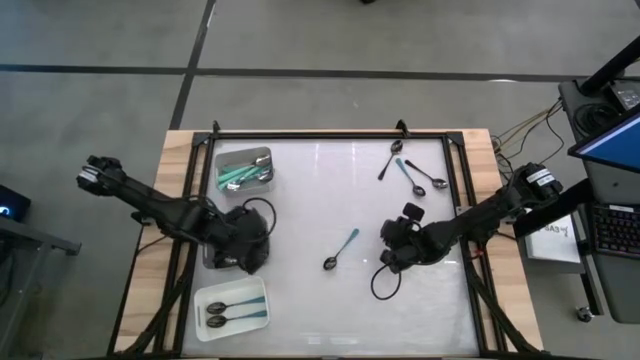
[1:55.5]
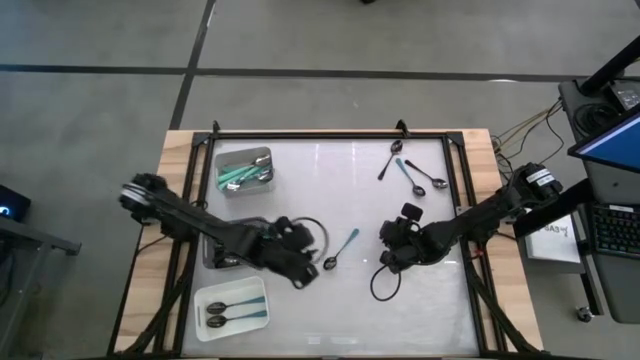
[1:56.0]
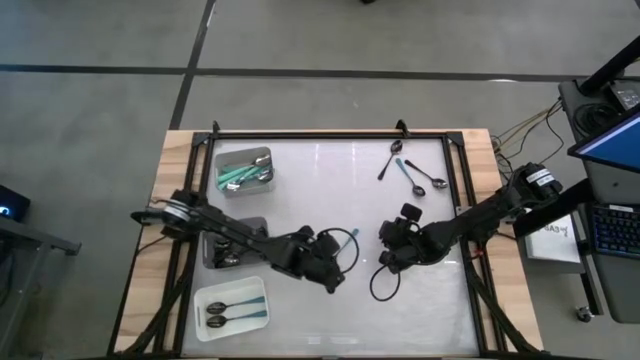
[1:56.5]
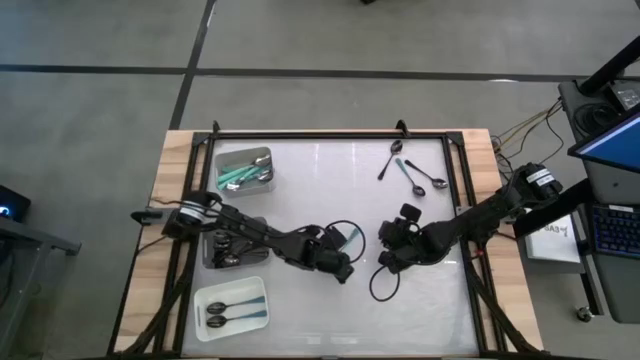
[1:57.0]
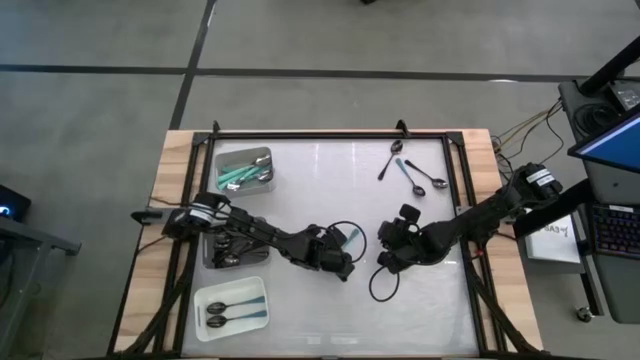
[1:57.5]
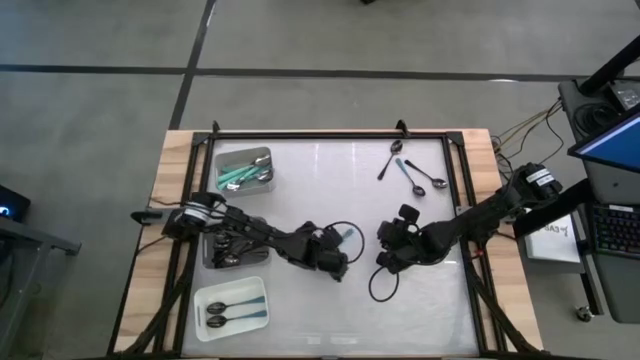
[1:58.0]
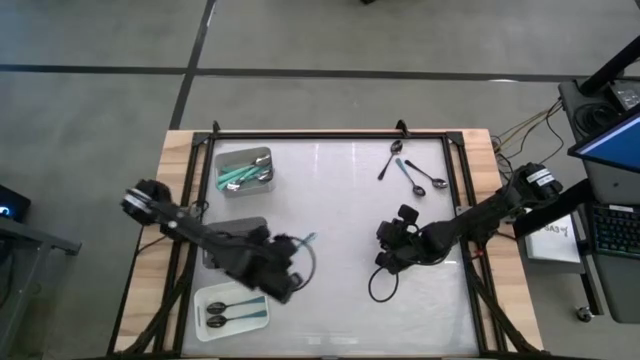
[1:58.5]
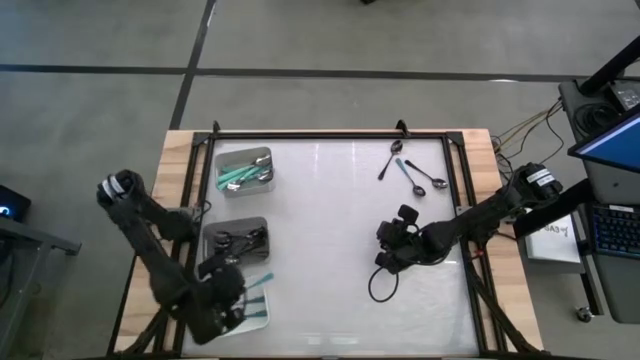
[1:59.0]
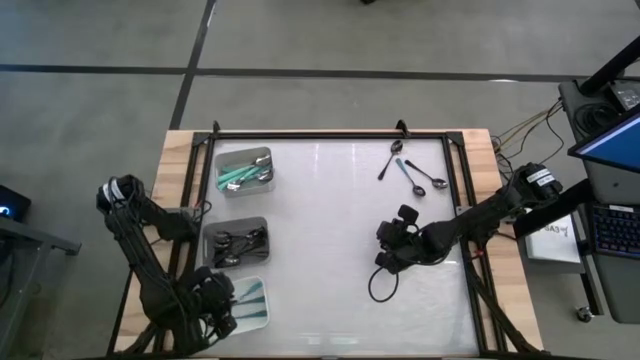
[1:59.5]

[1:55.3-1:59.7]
Task: Sort silverware by color (type)
Put the blue spoon into the white bin

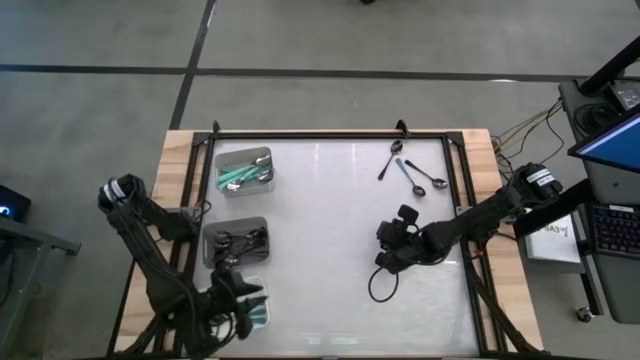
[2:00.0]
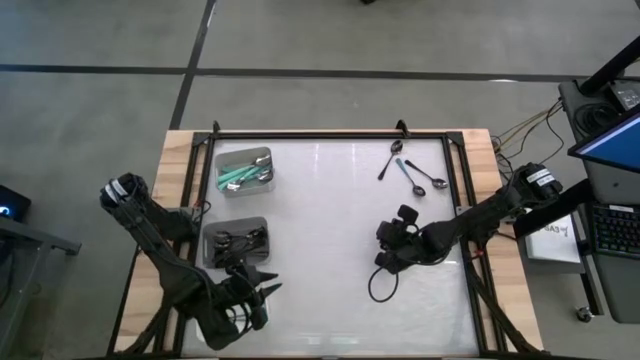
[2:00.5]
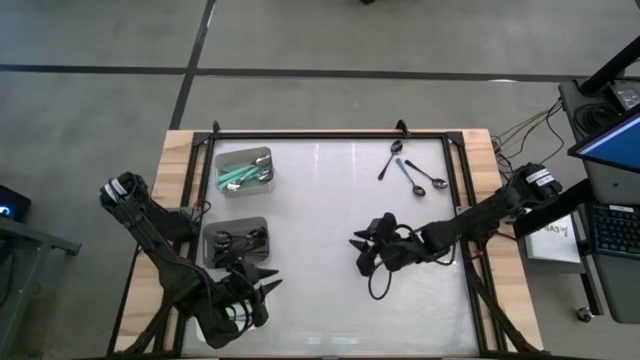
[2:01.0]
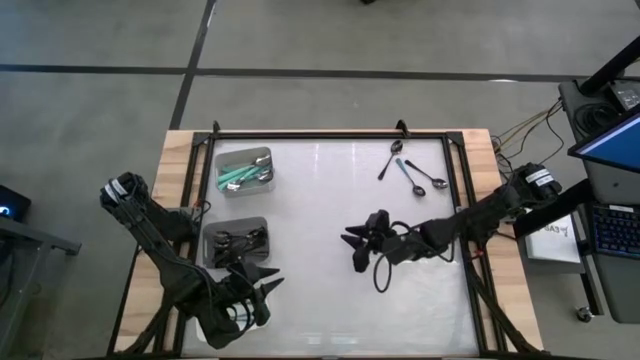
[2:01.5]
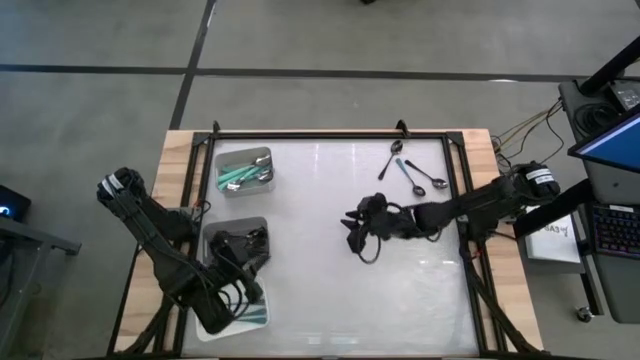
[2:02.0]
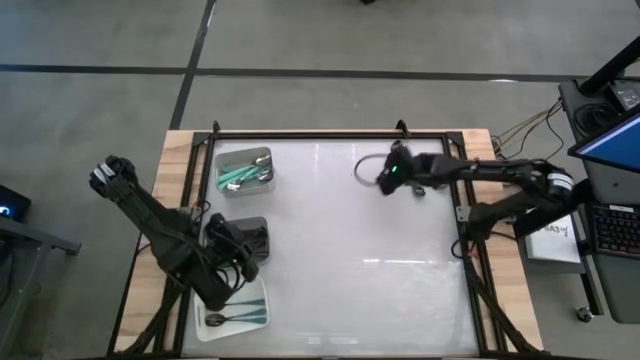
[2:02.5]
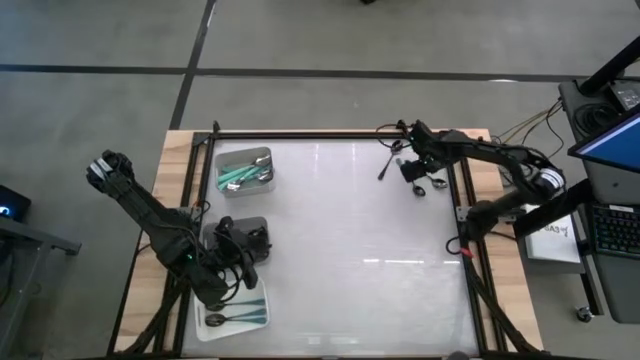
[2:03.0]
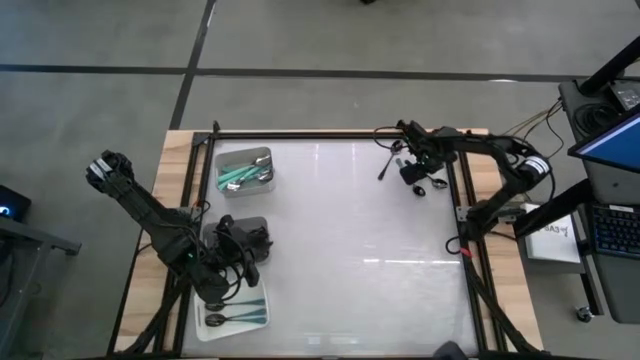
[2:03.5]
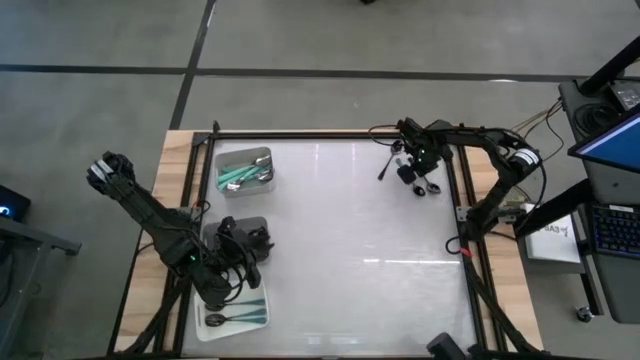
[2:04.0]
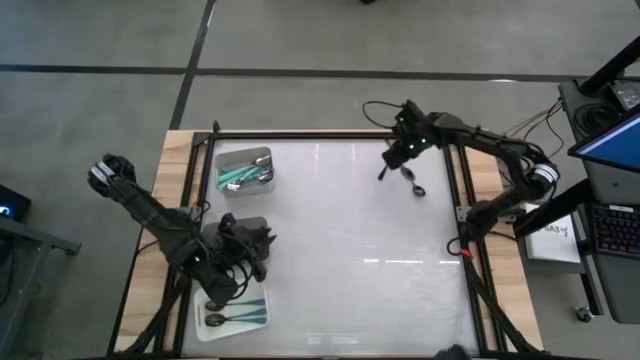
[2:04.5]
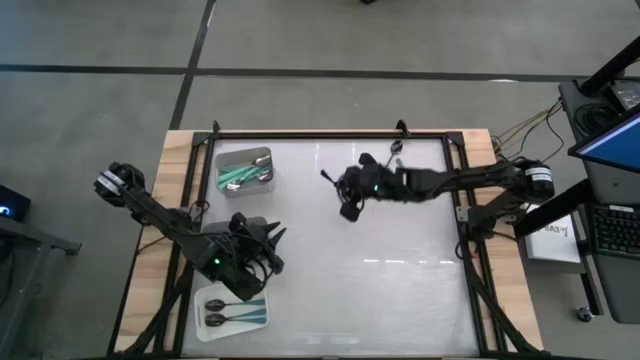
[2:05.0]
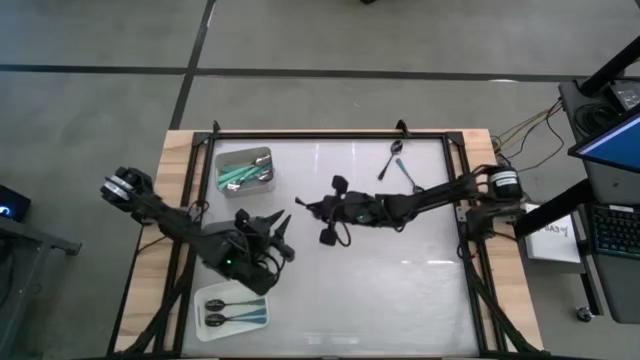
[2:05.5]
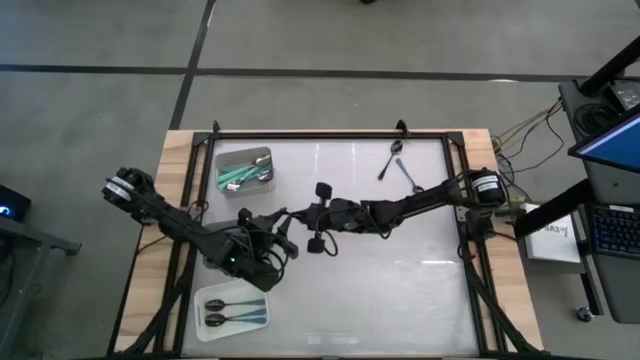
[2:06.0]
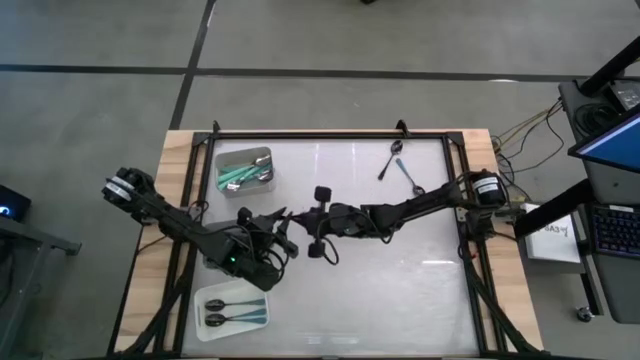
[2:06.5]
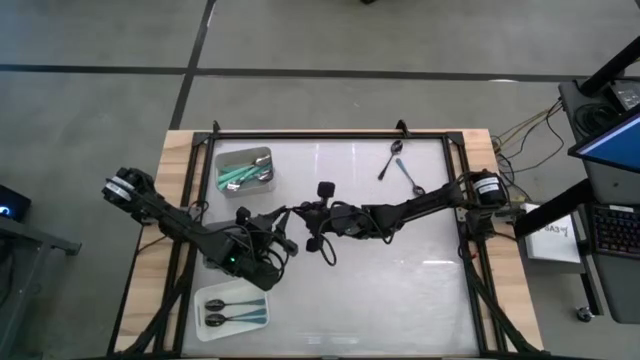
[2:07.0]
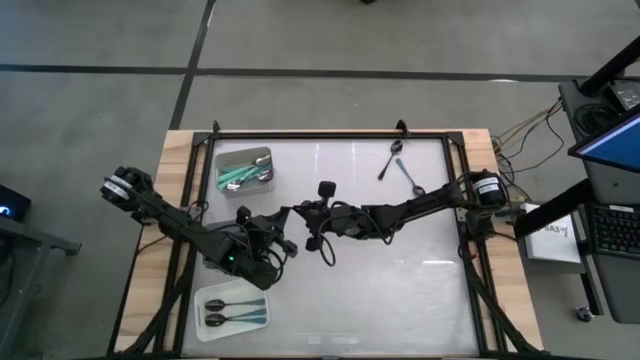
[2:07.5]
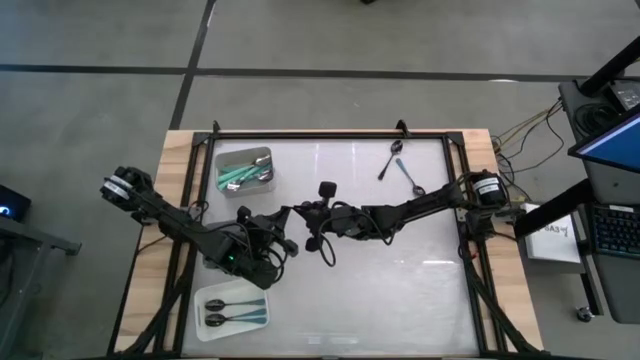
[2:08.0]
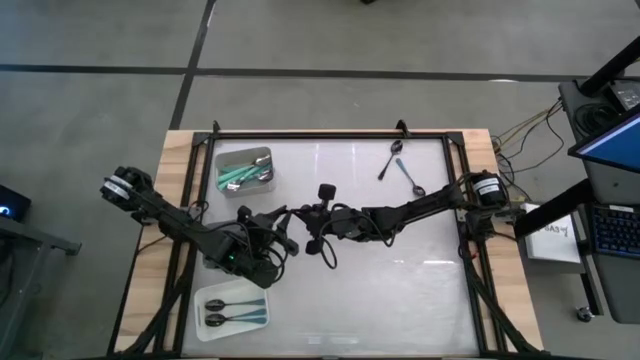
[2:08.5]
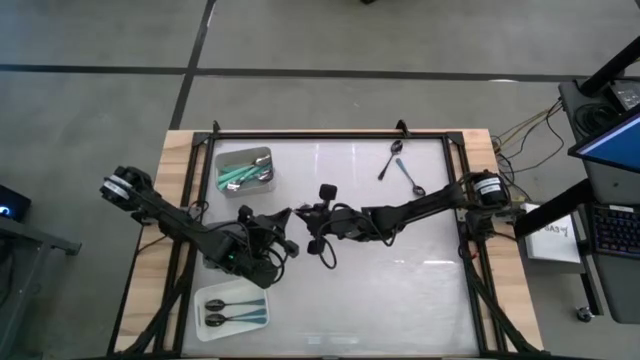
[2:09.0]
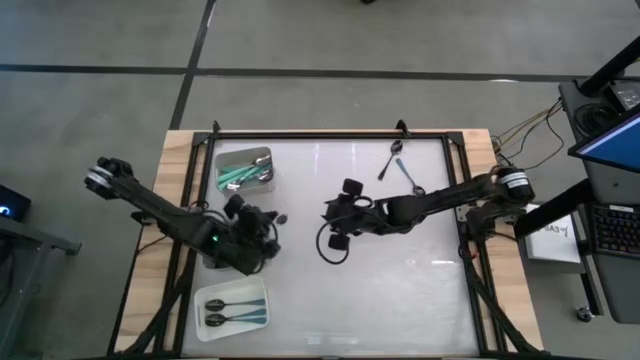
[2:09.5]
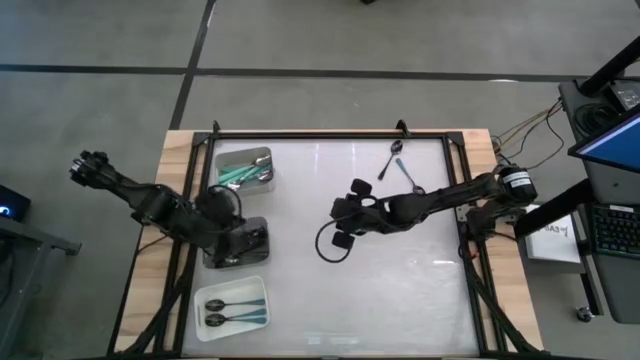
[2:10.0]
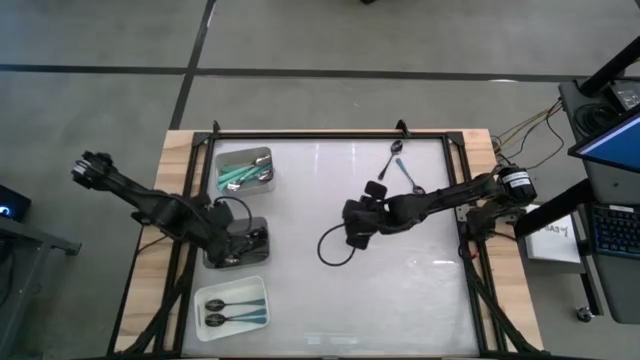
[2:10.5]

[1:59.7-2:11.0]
Put the black spoon into the black bin

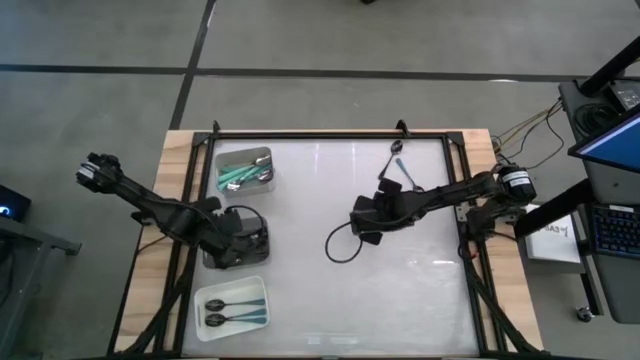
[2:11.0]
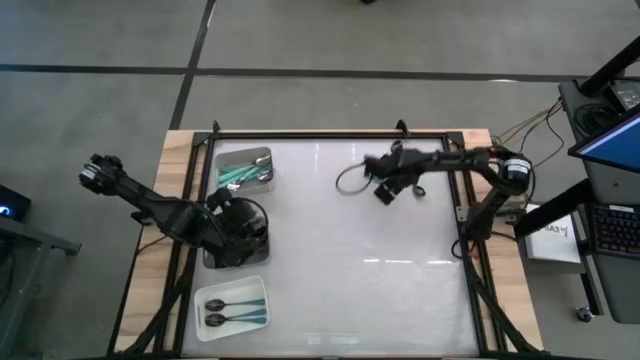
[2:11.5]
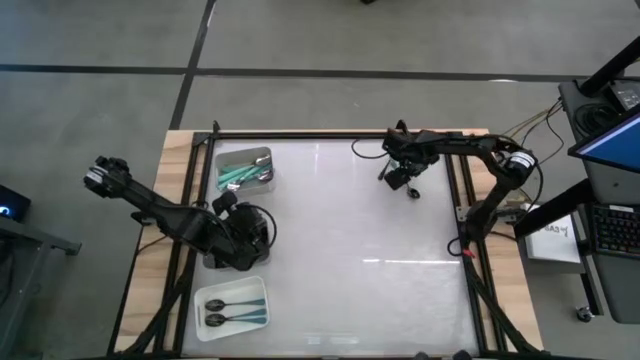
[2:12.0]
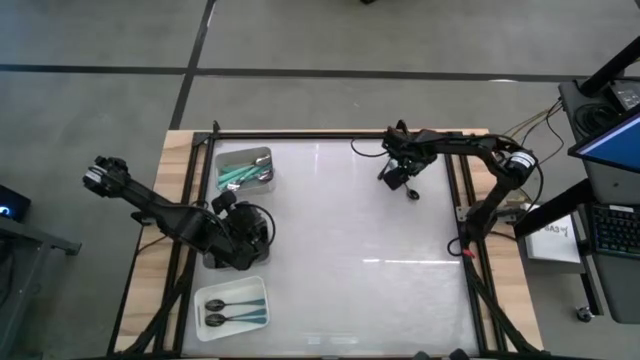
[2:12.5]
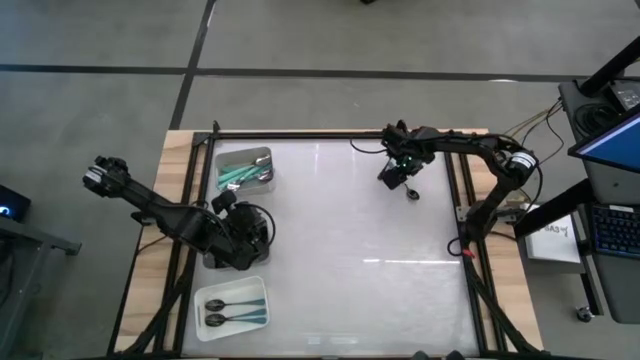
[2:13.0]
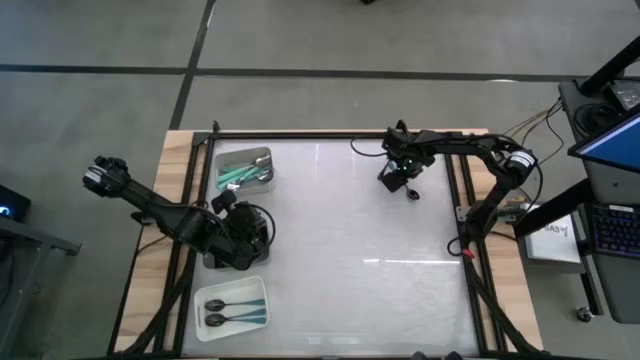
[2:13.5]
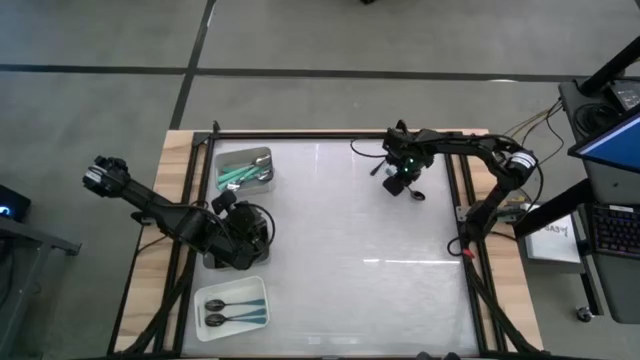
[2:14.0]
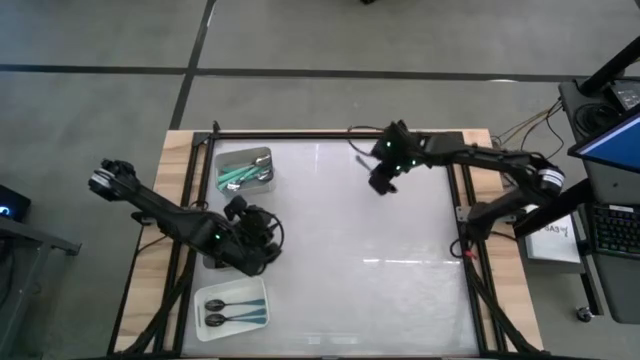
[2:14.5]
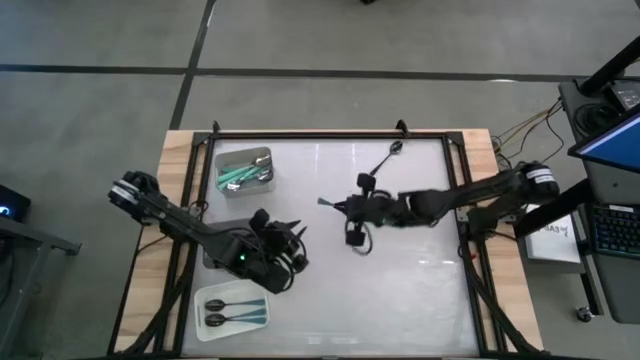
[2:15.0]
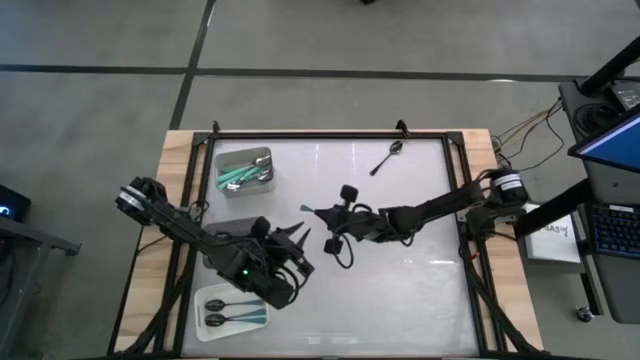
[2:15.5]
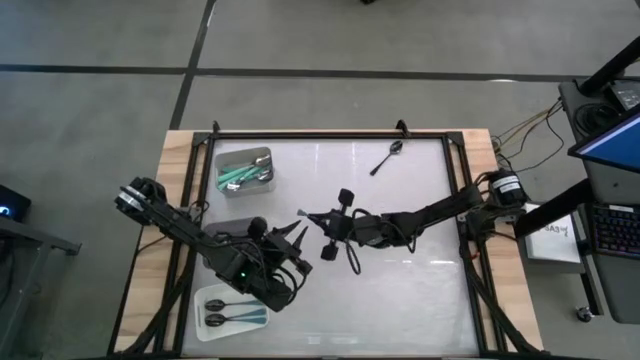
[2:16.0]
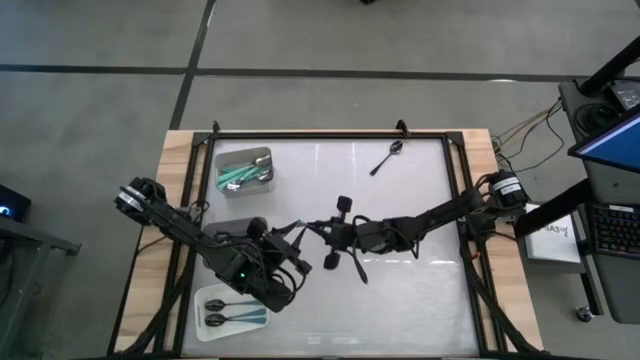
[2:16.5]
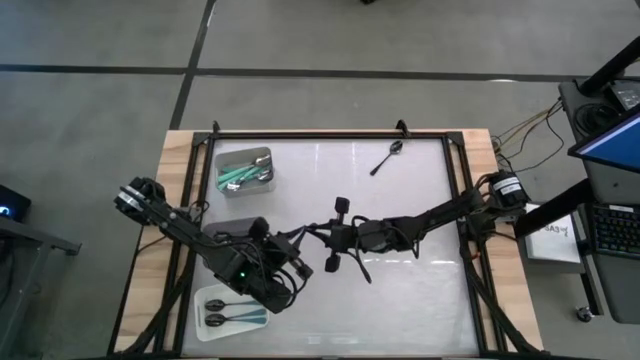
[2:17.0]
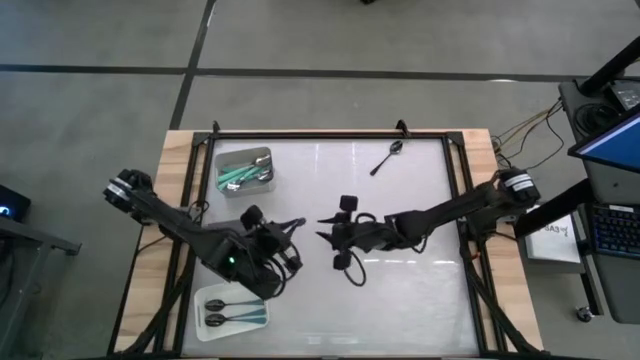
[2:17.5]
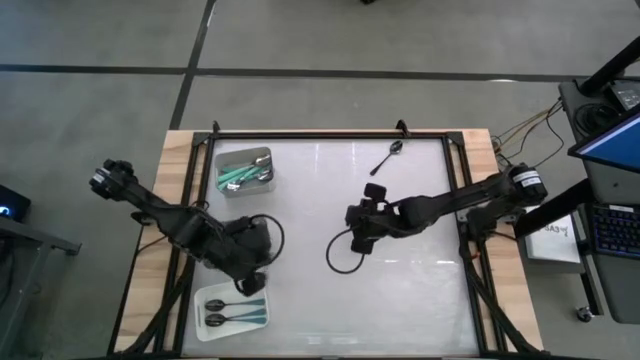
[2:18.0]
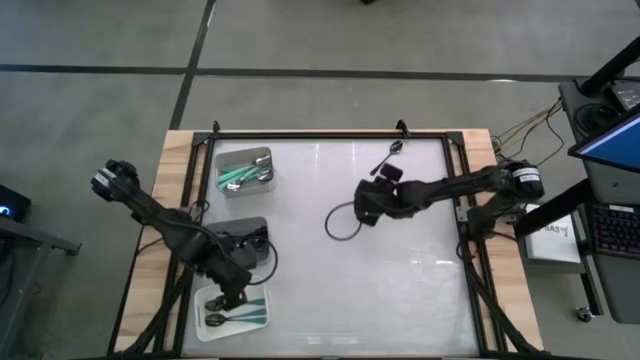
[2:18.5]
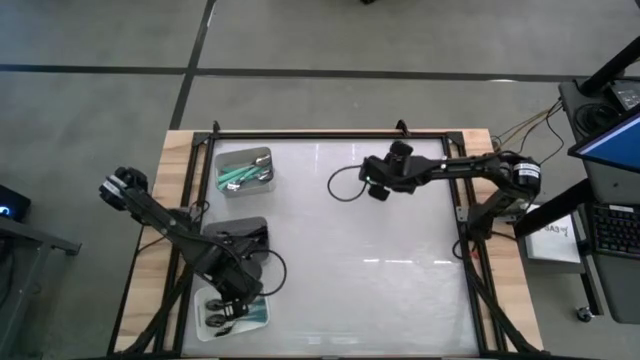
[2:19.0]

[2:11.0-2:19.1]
Put the blue spoon into the white bin
